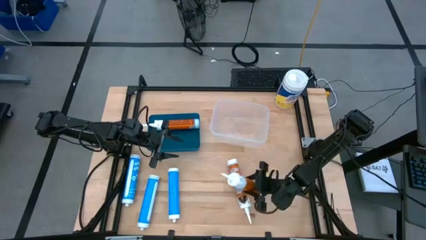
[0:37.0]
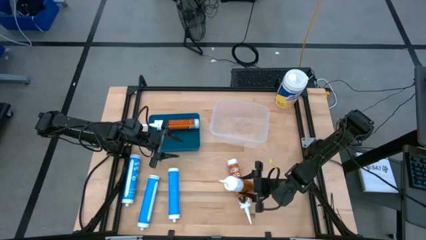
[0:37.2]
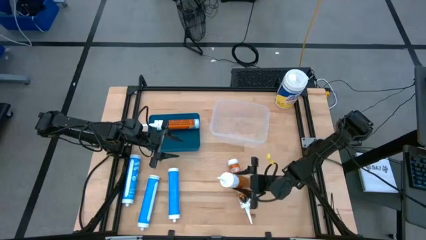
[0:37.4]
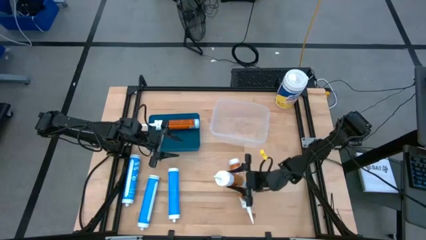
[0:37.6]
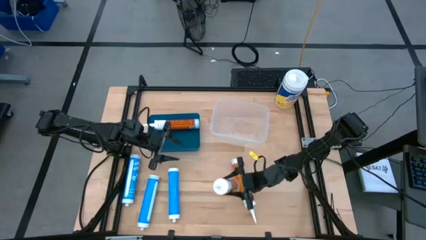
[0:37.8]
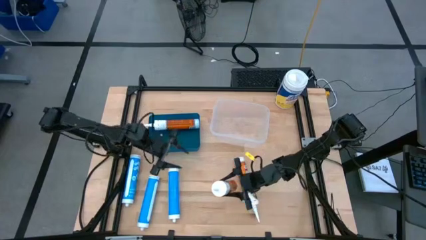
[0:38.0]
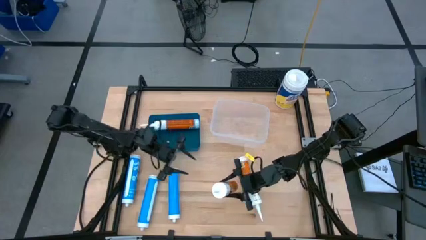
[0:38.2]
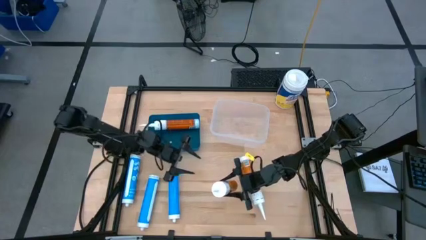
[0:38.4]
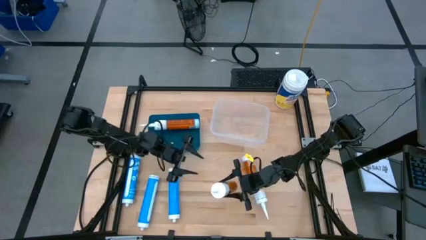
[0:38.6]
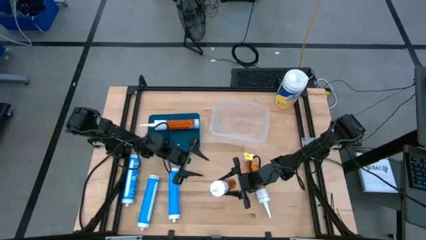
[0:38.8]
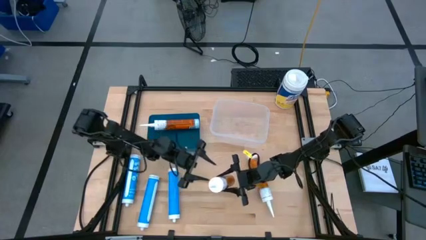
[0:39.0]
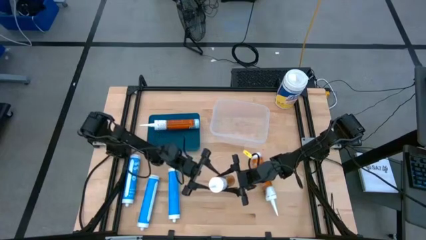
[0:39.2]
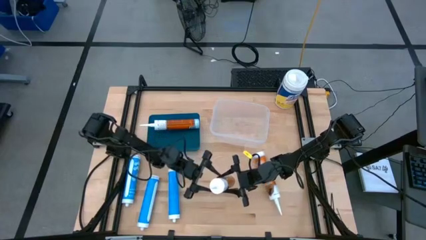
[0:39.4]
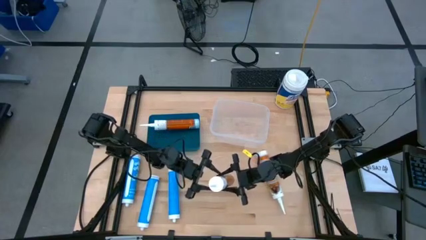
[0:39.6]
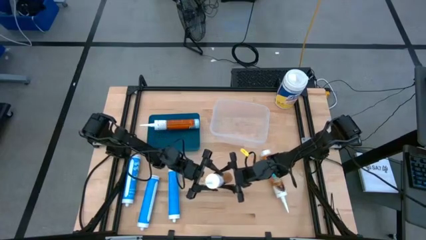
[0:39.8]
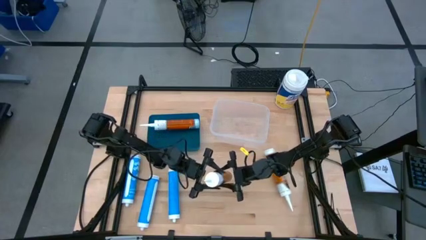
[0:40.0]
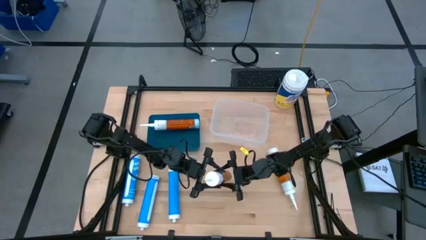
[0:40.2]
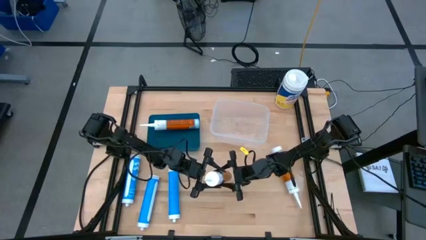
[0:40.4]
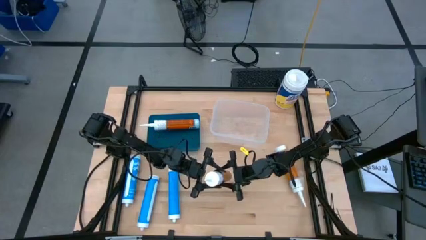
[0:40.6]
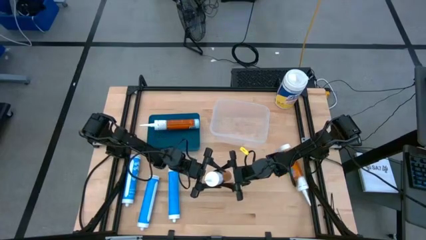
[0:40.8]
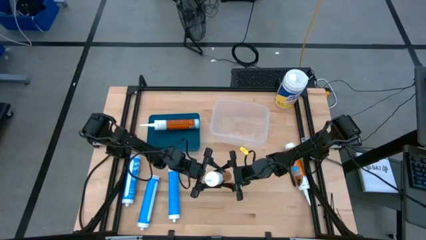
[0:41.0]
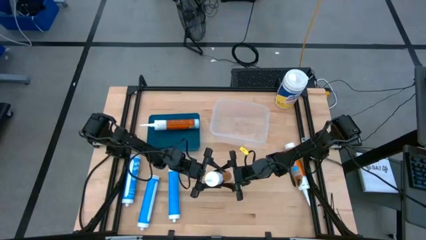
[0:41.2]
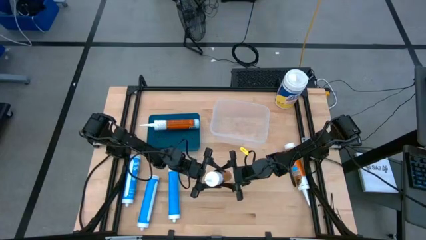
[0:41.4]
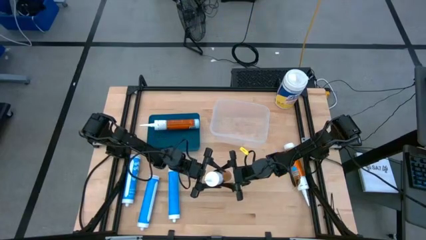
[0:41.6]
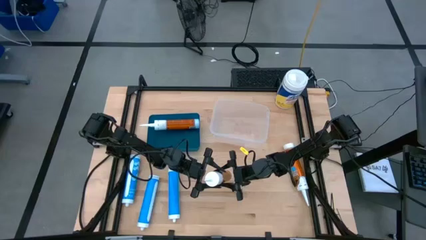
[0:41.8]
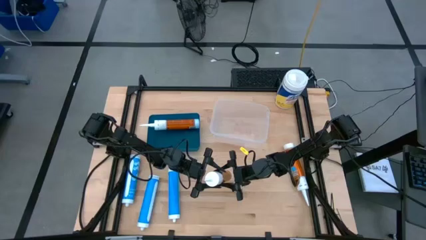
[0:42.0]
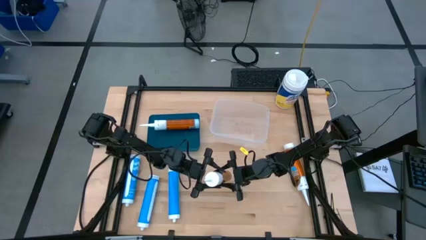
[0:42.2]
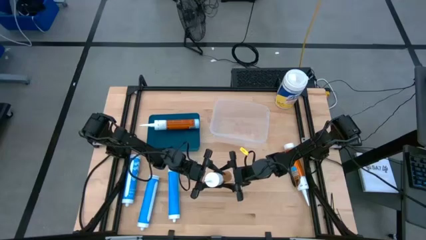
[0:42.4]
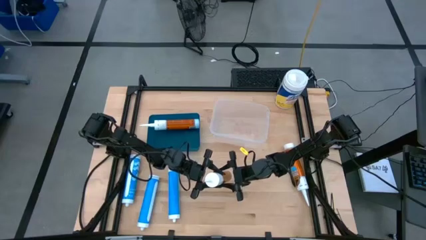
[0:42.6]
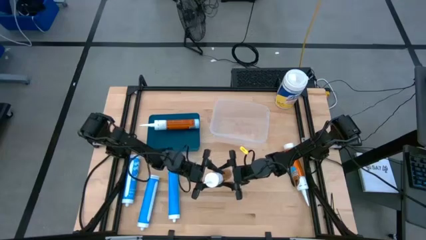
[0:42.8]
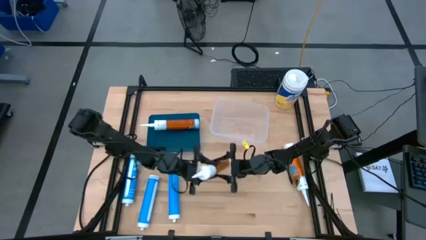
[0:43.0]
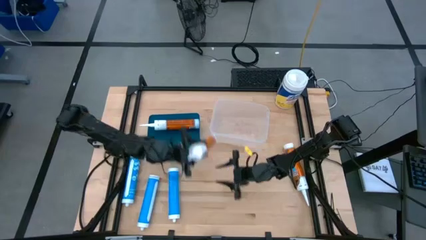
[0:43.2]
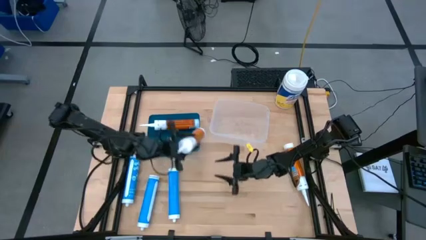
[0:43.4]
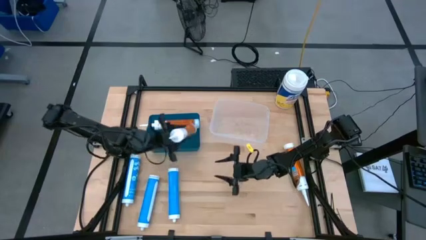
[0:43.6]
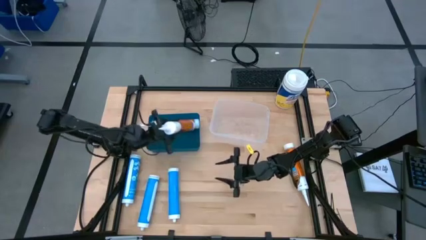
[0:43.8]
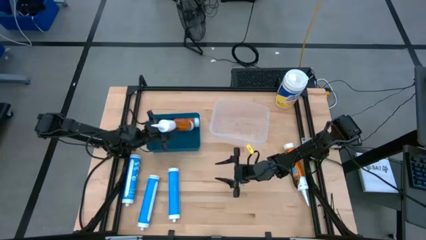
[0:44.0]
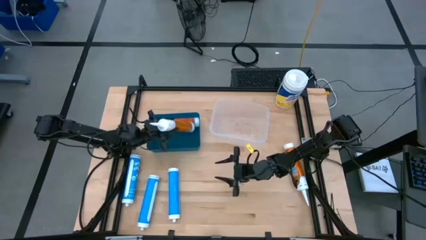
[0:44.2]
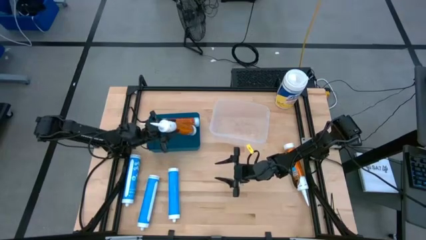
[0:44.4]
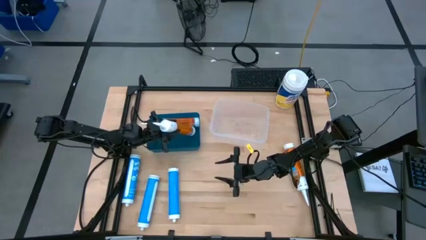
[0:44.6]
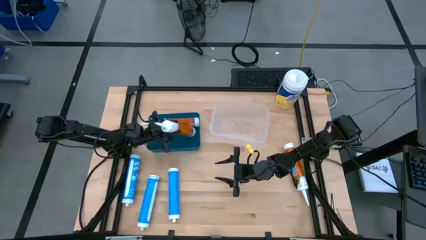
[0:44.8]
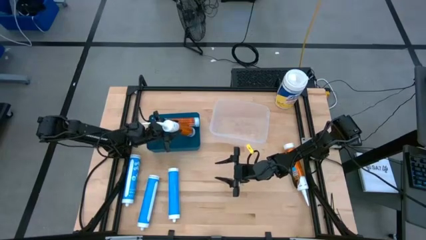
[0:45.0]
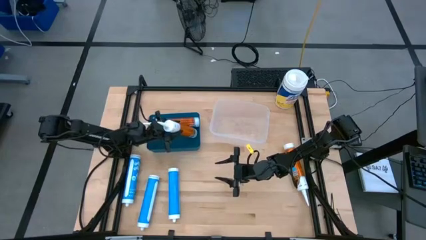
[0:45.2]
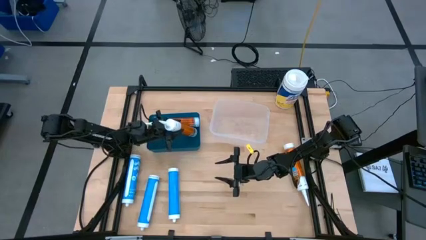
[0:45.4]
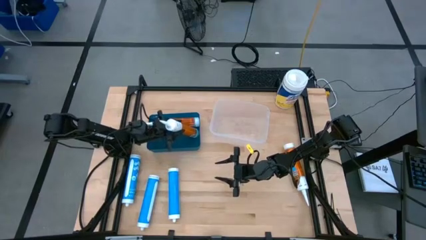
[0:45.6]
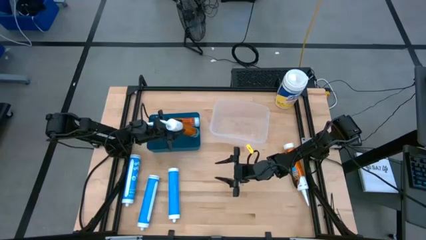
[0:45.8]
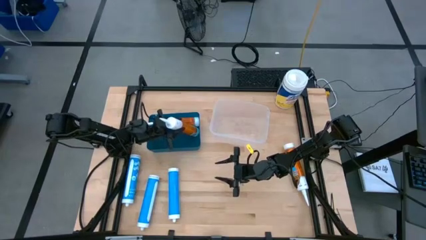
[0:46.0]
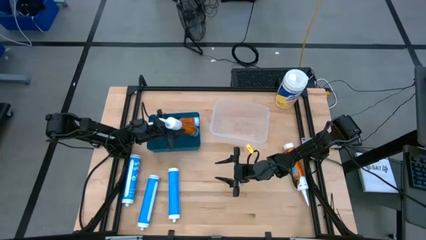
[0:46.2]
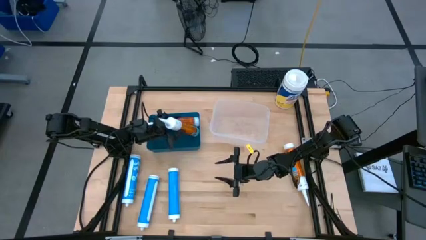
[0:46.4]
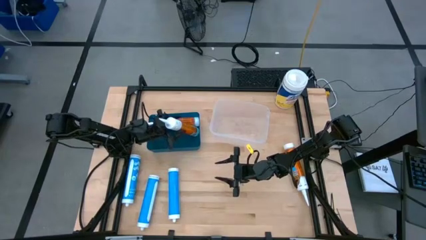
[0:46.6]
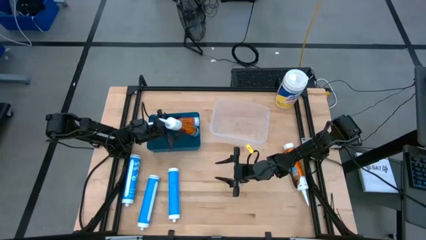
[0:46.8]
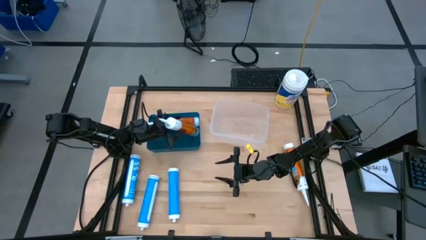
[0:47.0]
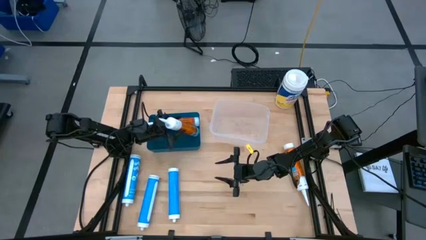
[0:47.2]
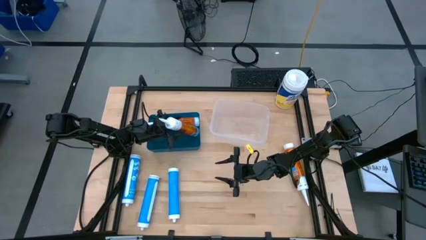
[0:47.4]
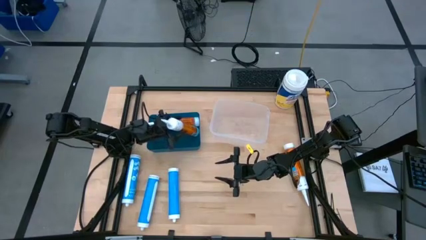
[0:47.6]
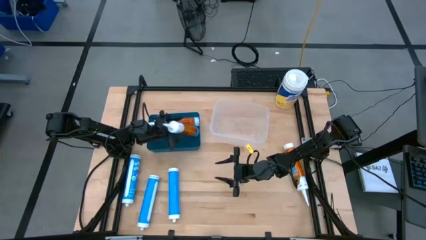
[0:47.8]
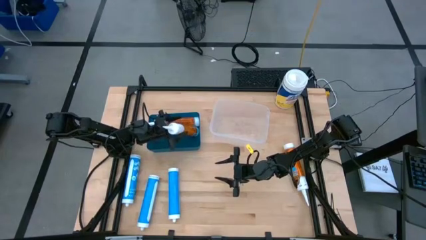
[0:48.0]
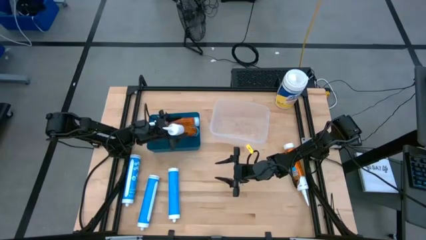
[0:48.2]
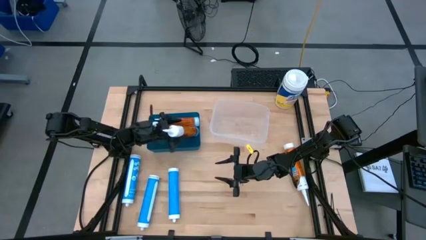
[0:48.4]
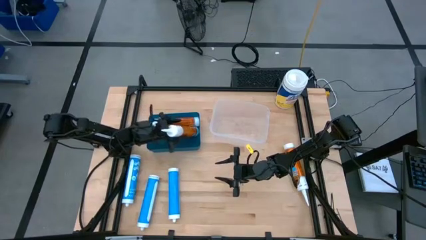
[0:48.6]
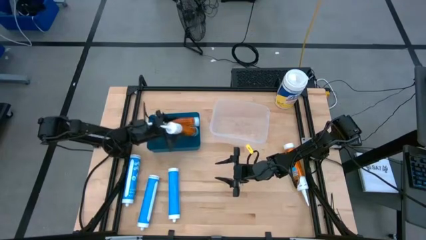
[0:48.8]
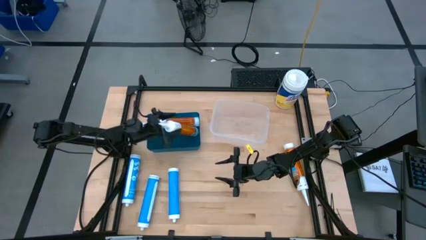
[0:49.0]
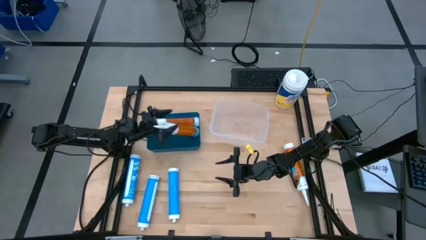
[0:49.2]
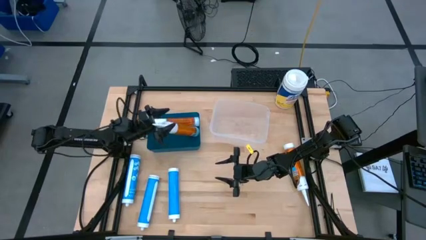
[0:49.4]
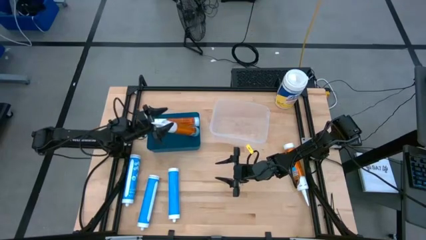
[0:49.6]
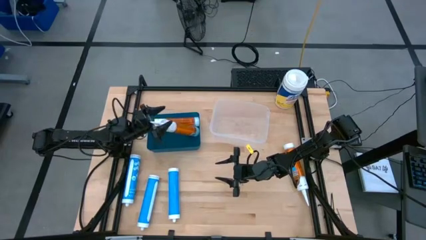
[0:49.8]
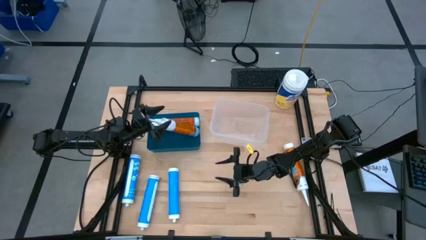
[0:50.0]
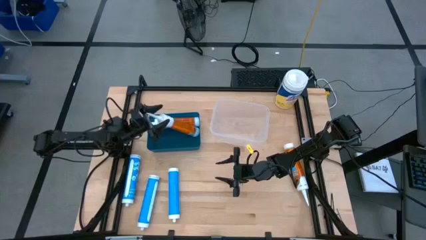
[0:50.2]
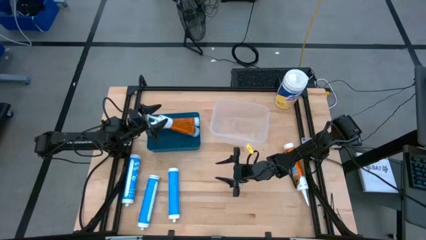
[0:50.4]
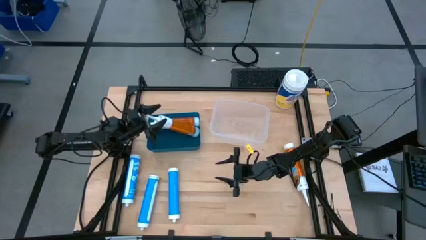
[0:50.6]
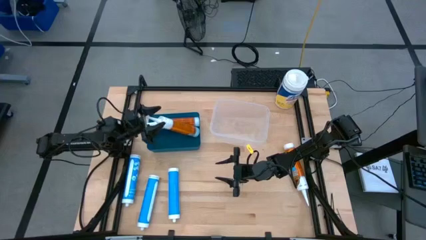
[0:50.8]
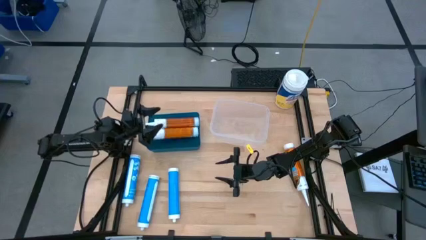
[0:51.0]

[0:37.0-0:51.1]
Task: Pick & place silicon tubes, Sealant and Lysol wipes
Put the right orange sealant into the blue bin

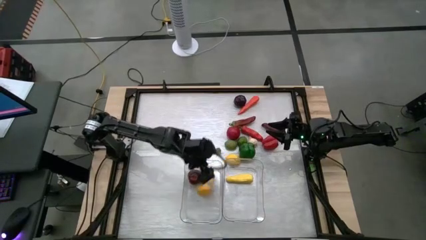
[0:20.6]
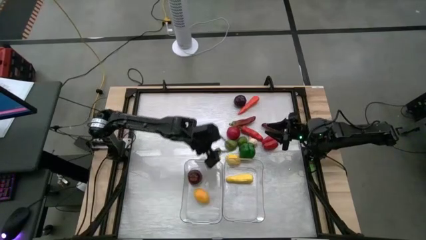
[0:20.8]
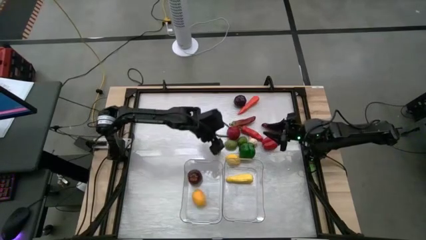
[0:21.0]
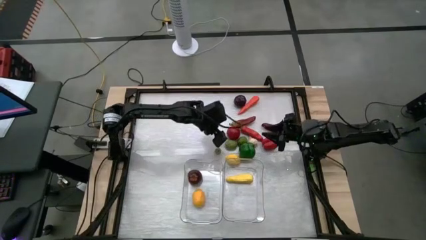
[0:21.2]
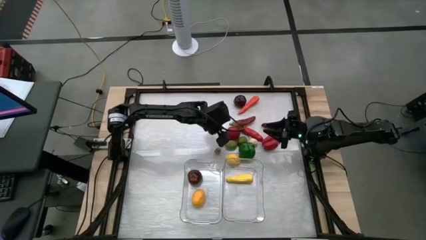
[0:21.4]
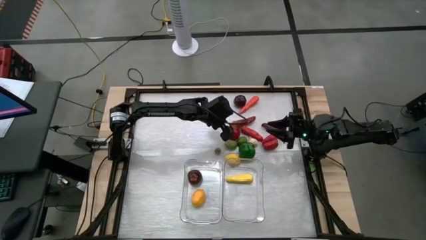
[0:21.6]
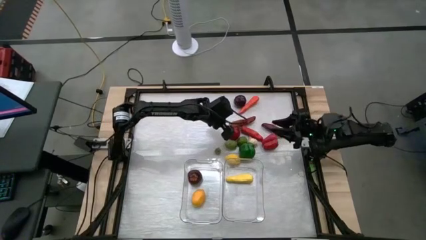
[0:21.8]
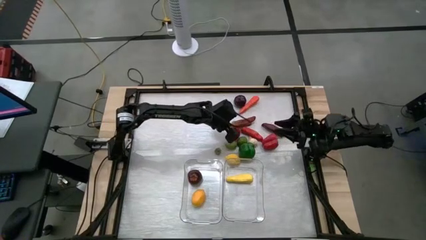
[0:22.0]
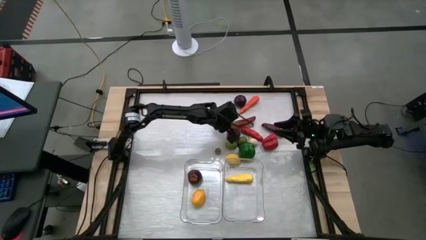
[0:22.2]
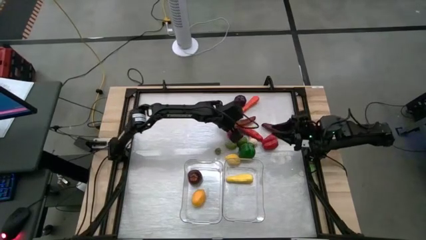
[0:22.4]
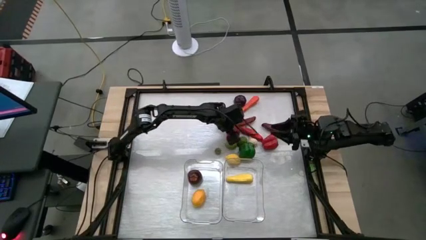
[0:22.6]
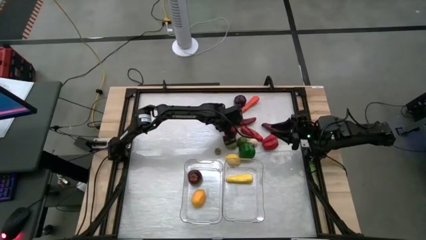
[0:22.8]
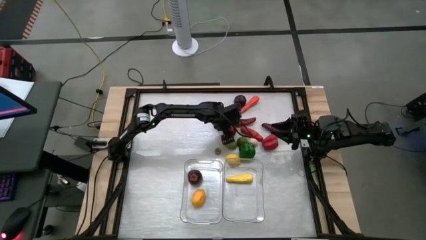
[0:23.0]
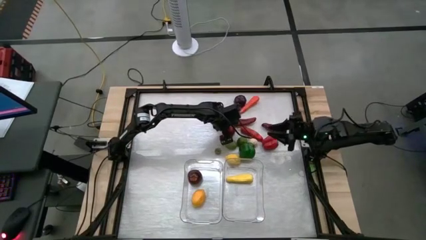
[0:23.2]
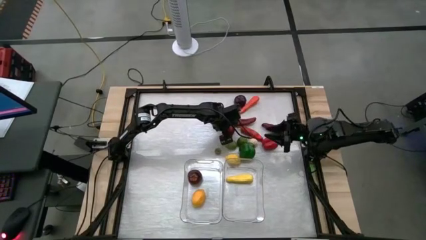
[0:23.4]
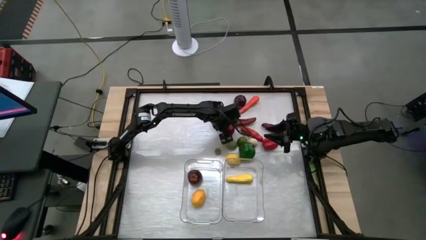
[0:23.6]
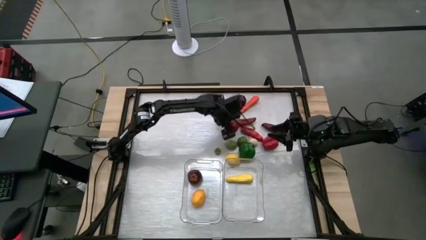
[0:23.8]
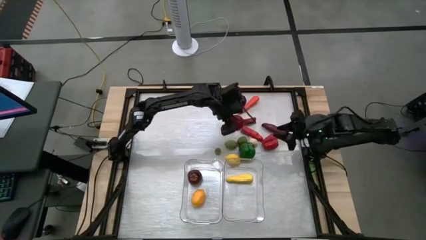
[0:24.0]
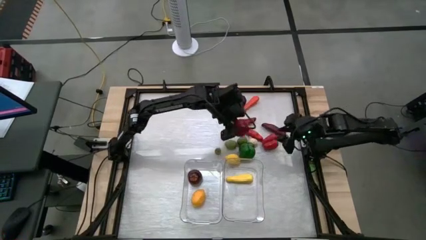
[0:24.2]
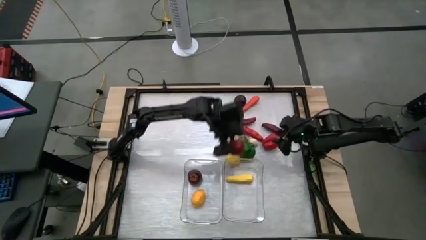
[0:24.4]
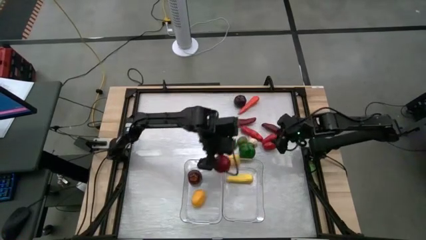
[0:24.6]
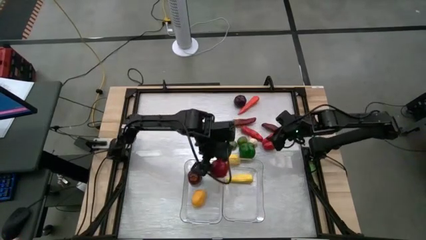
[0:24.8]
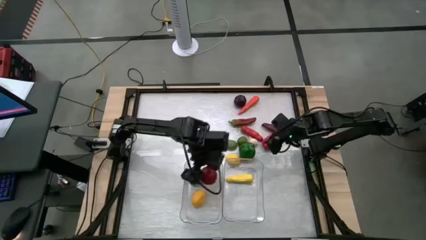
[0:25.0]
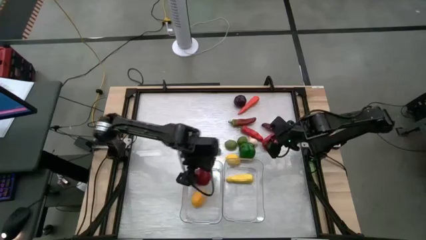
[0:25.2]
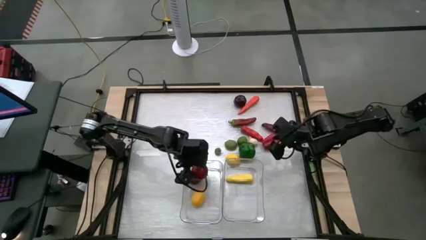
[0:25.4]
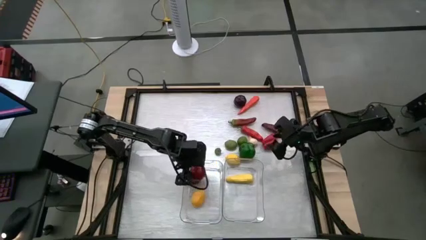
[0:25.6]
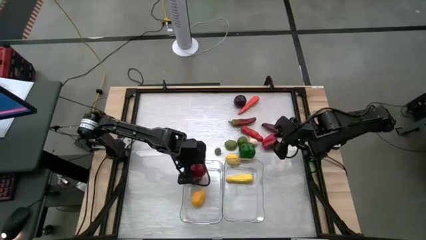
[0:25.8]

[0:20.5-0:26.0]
Task: Sort produce into baskets
Put the red tomato into the left transparent bin
